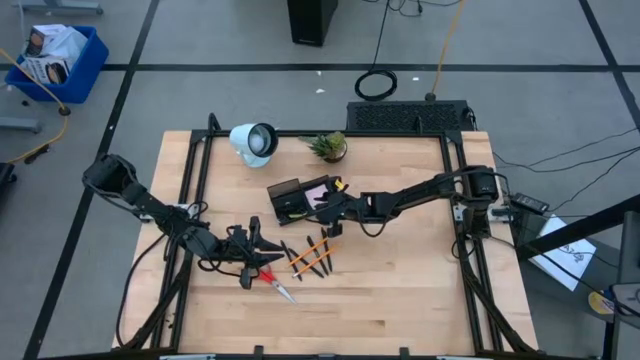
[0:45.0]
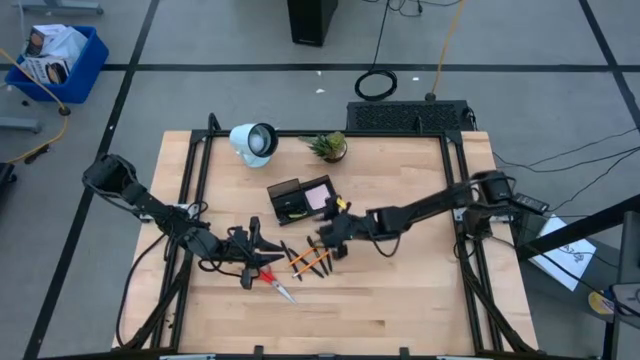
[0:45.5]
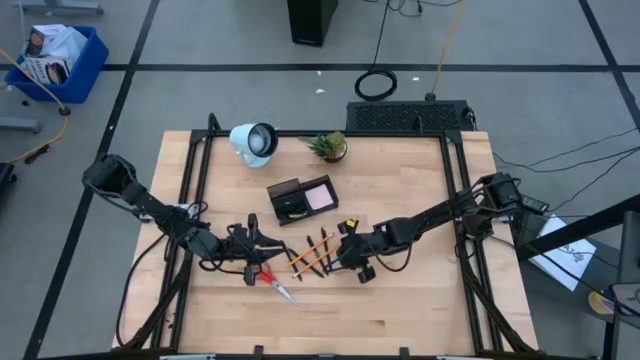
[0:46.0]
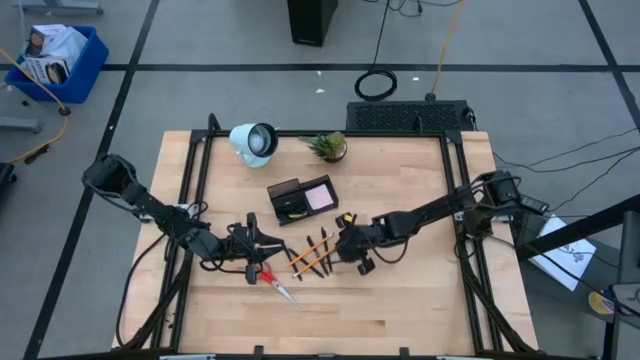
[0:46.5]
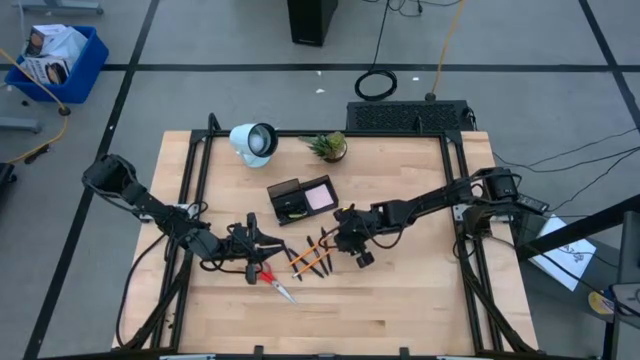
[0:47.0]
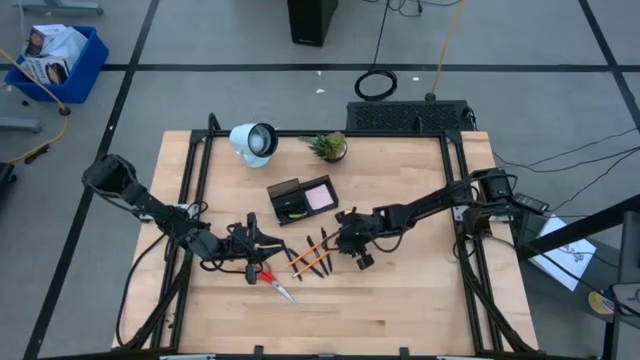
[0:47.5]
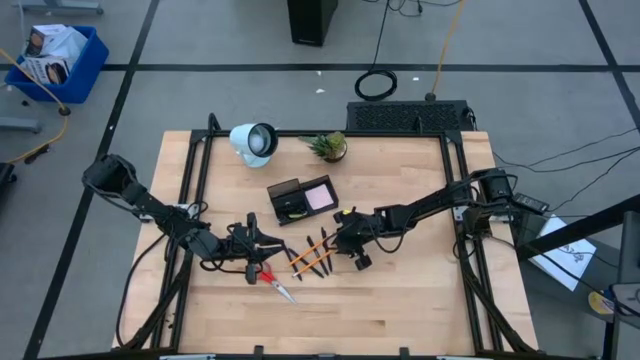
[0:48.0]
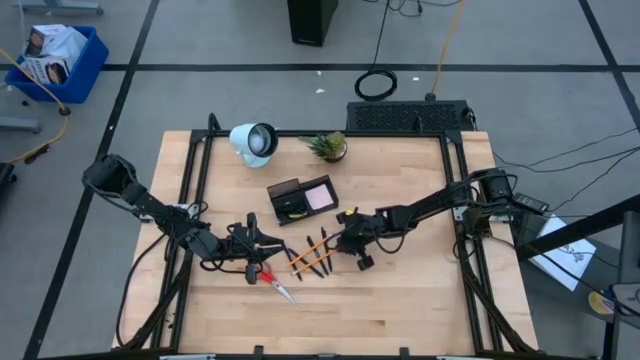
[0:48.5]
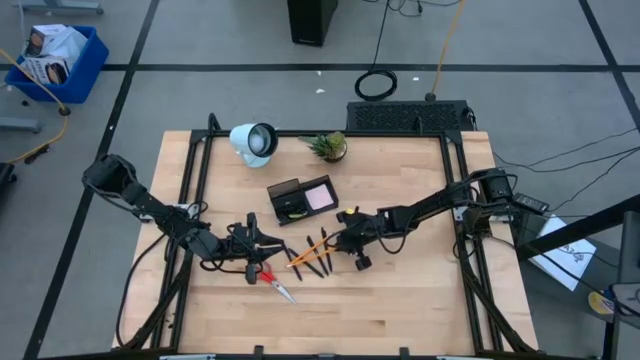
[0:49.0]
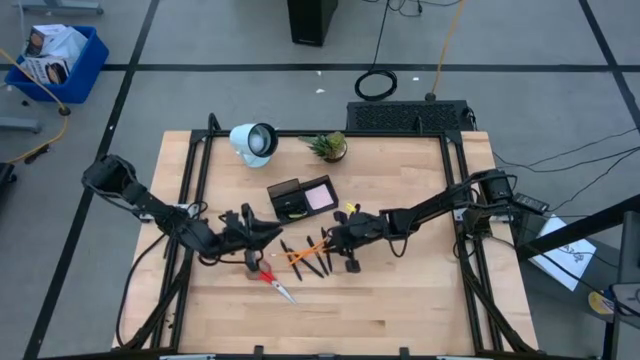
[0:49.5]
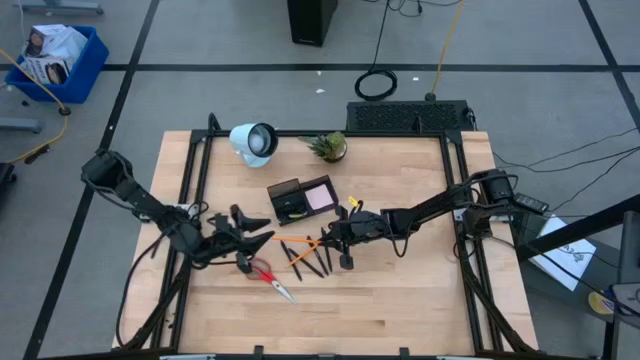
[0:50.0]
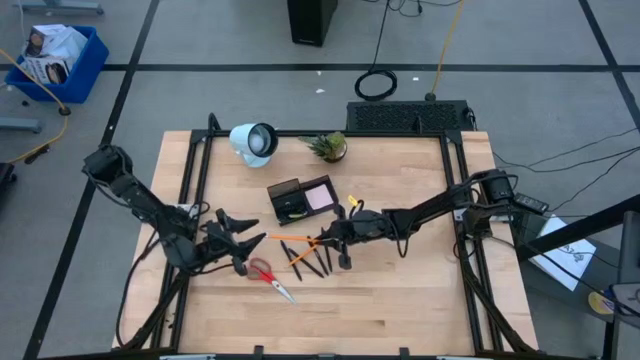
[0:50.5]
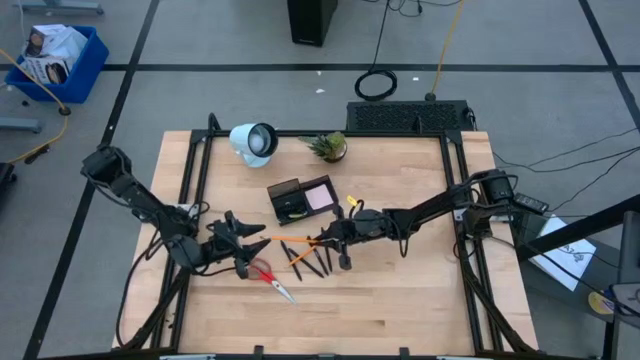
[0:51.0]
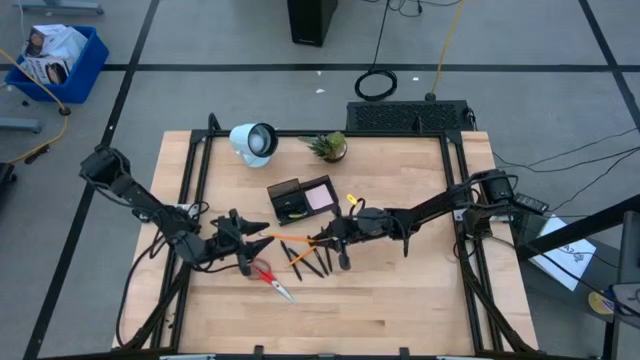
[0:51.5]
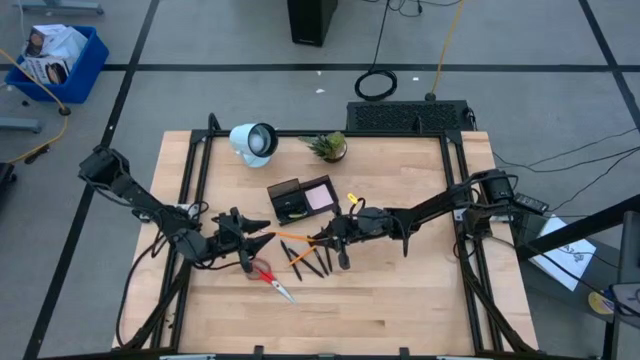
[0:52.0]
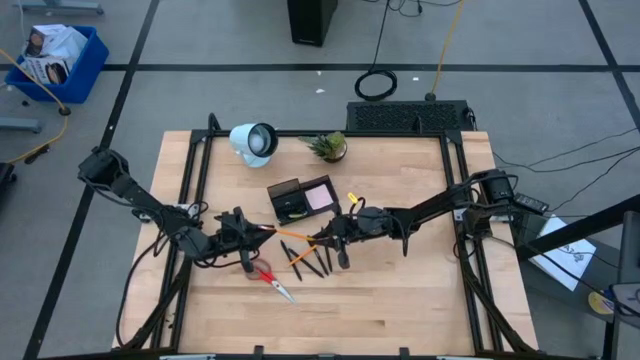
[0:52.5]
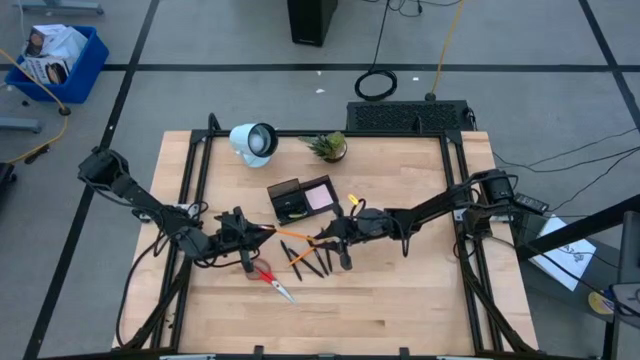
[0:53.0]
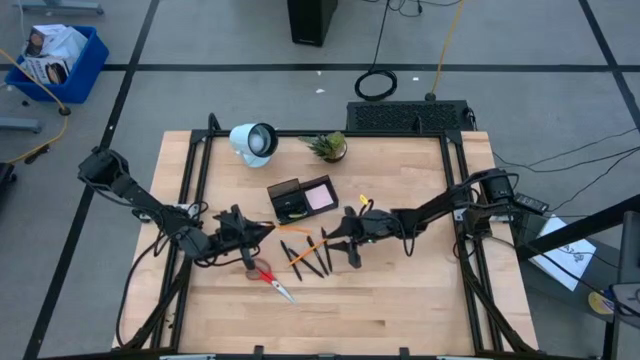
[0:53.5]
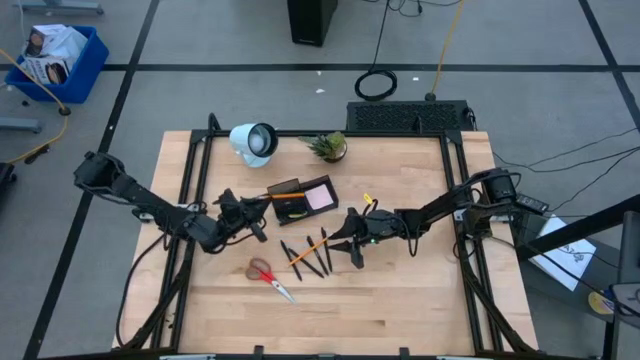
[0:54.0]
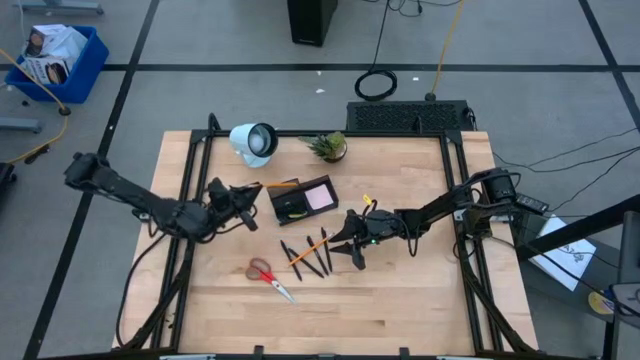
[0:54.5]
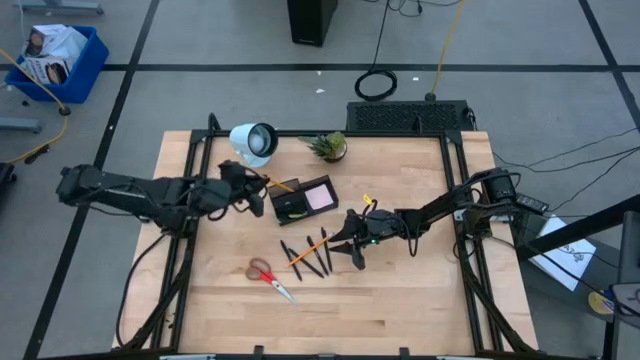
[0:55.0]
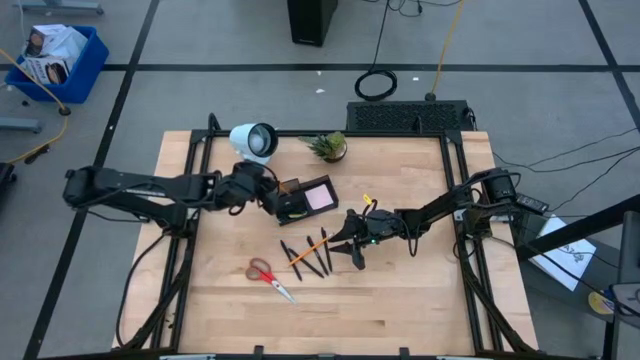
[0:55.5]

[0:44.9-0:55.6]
Task: Pick and place office supplies into organizer
Put the orange pencil into the black desk organizer

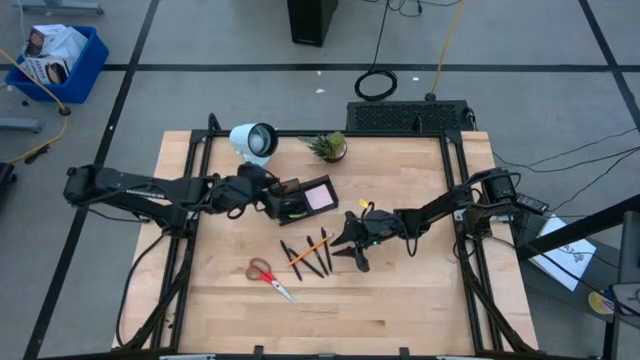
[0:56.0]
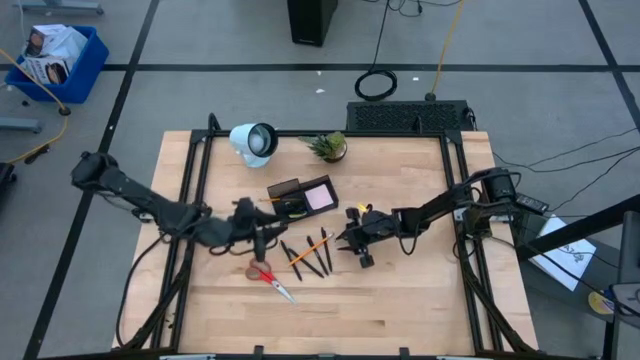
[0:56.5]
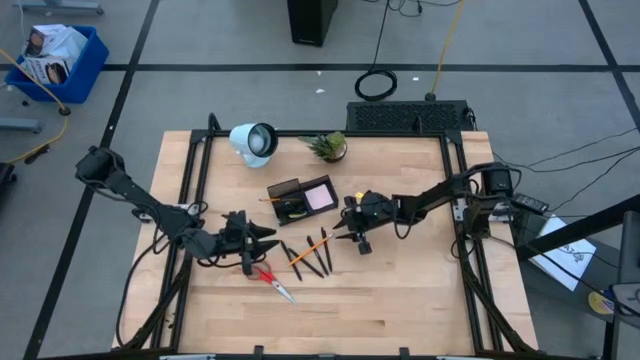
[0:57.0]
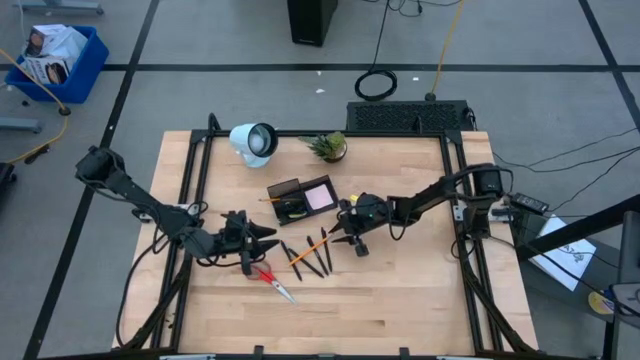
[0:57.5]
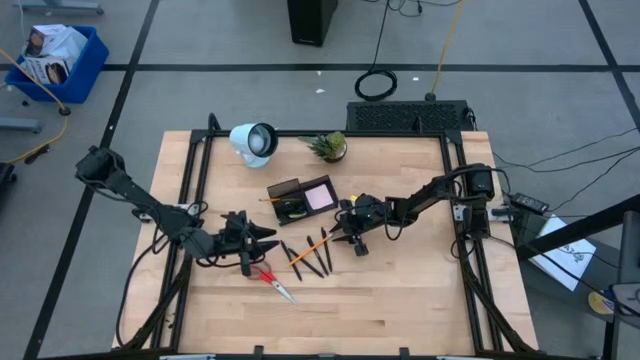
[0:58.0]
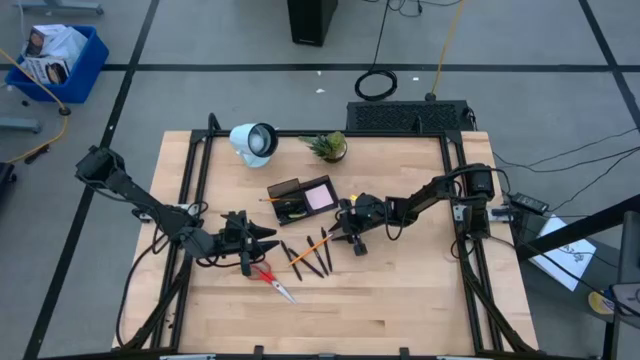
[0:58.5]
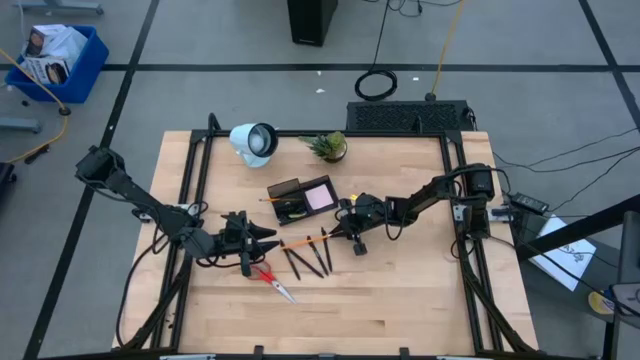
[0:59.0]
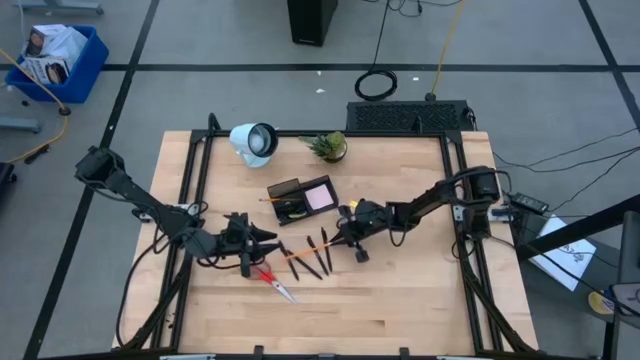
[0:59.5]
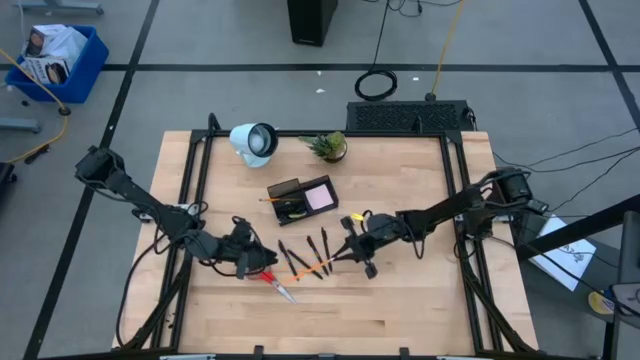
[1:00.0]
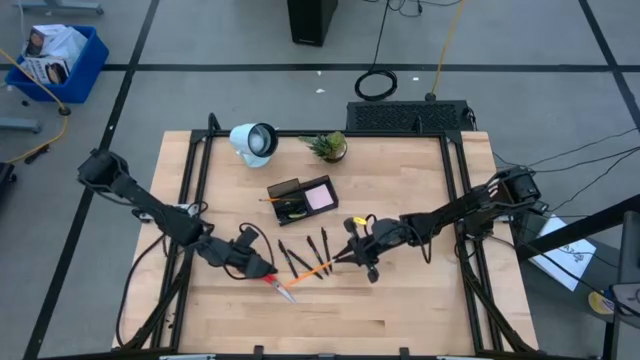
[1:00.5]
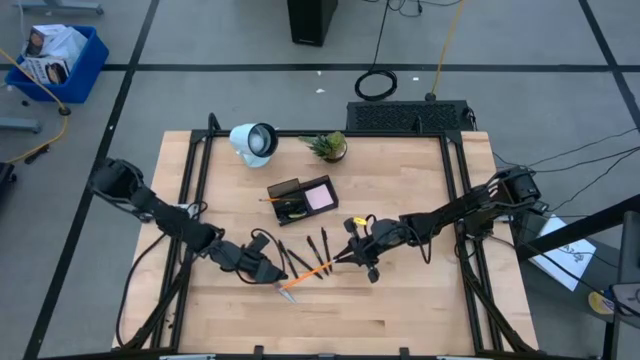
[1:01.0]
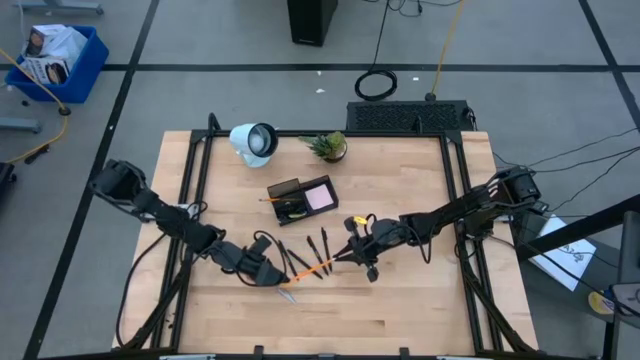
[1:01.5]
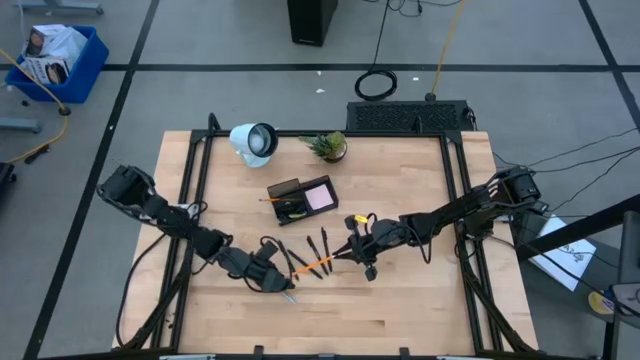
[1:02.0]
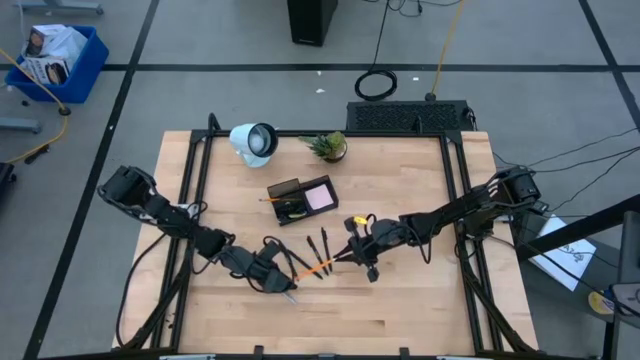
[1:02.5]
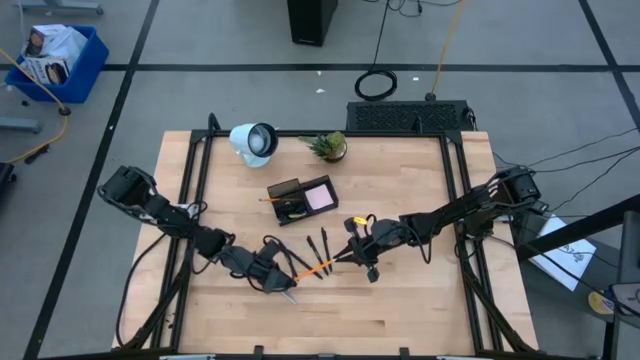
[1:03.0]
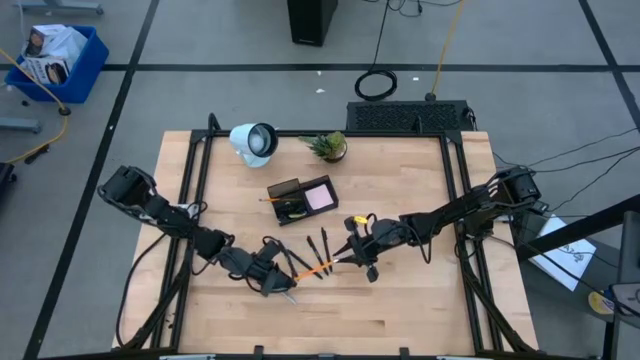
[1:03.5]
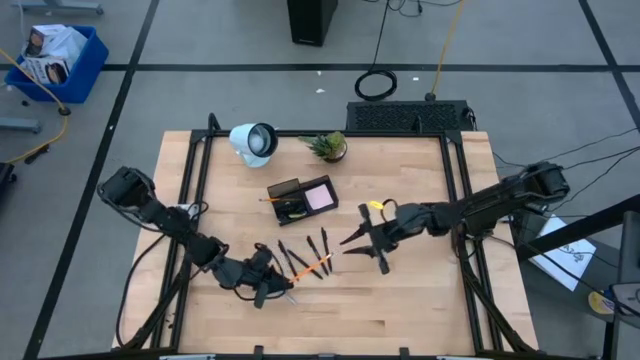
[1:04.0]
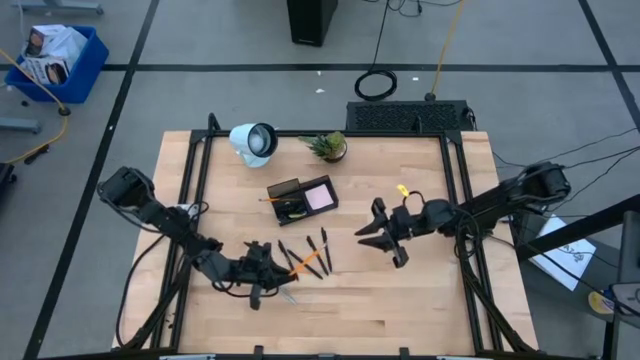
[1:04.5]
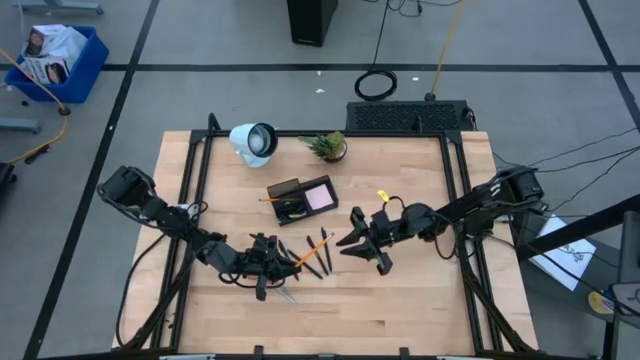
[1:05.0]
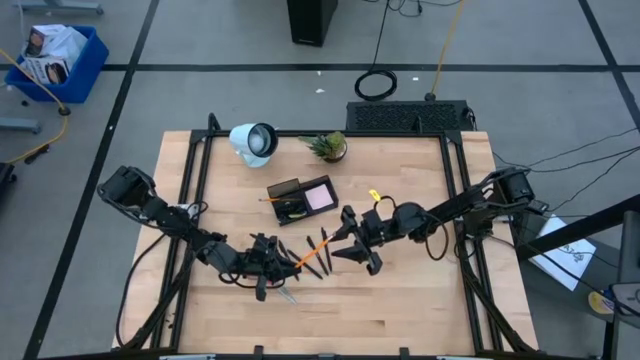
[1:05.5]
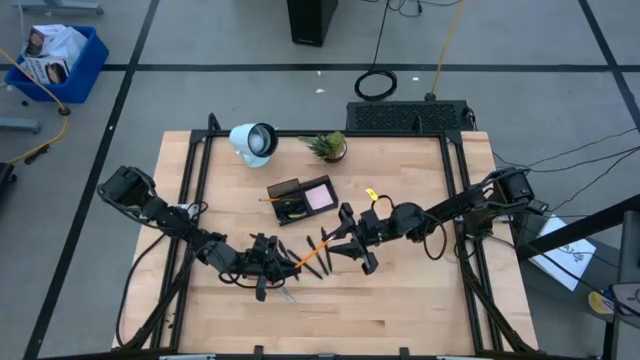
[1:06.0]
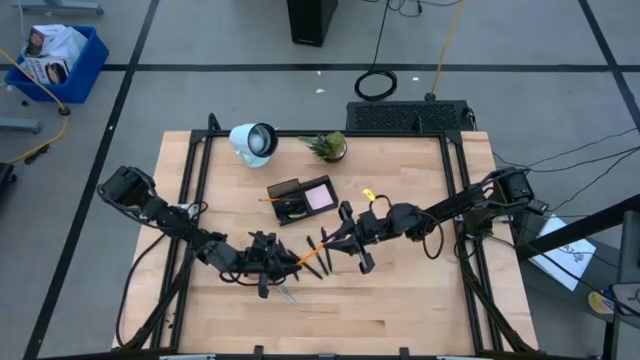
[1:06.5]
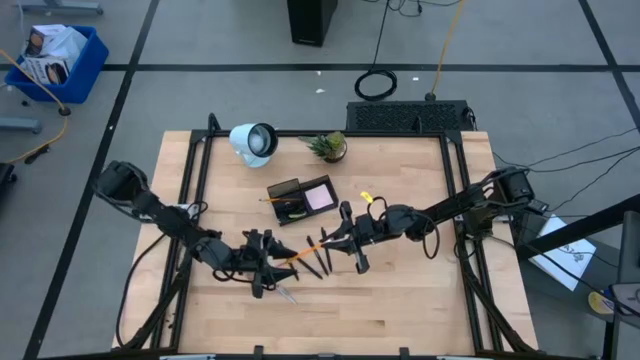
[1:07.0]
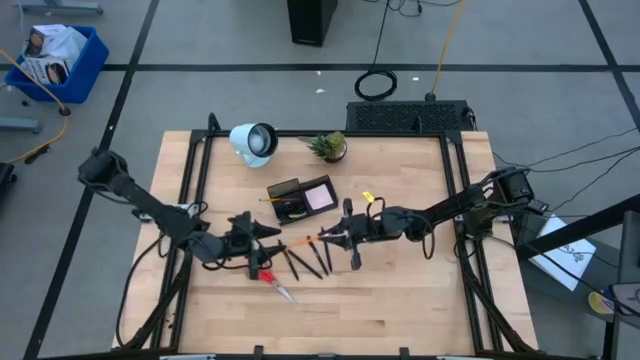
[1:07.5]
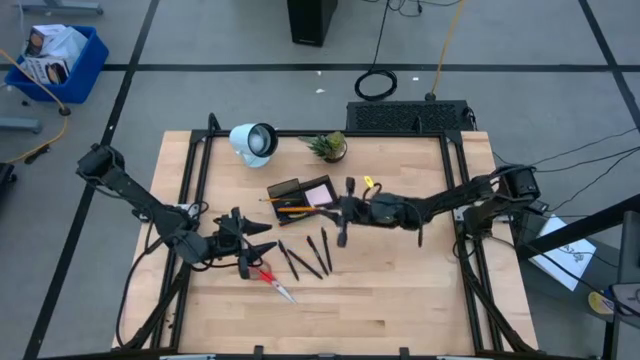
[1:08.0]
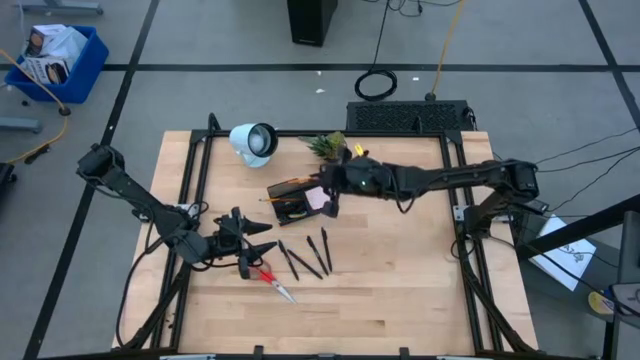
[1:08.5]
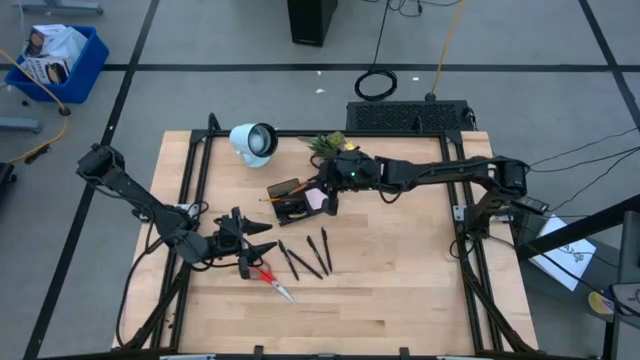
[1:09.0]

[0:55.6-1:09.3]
Put the orange pencil into the black desk organizer
